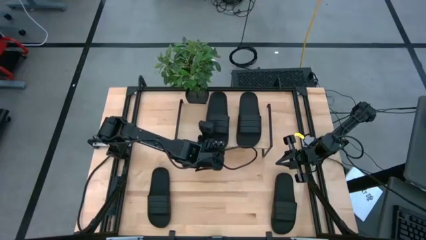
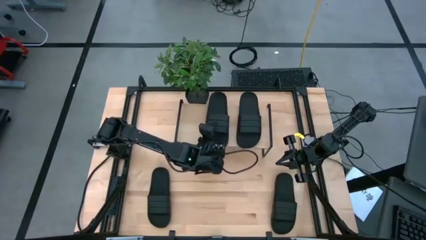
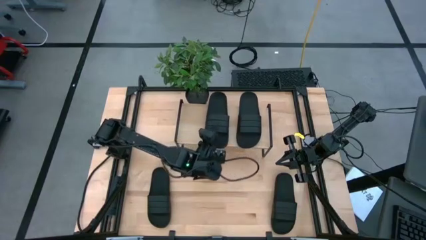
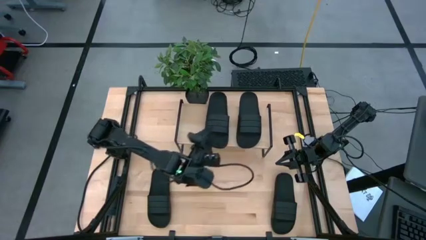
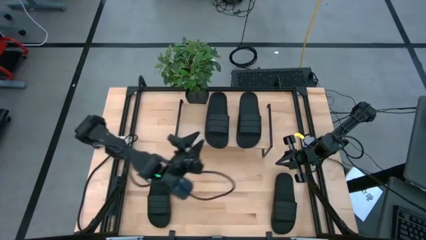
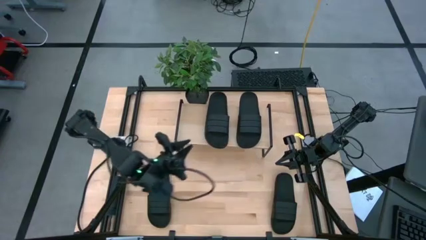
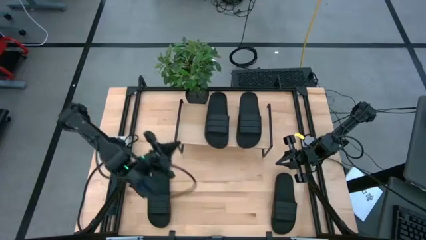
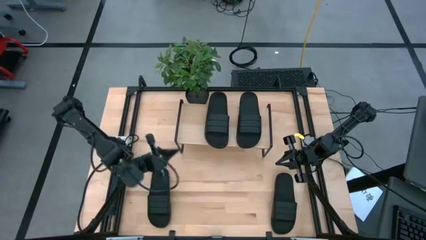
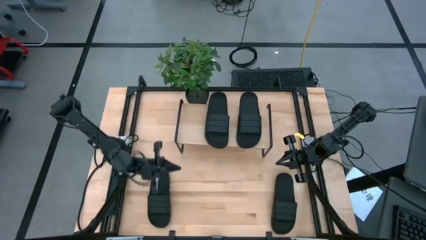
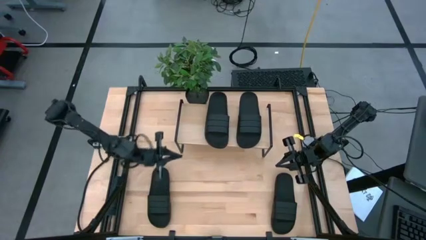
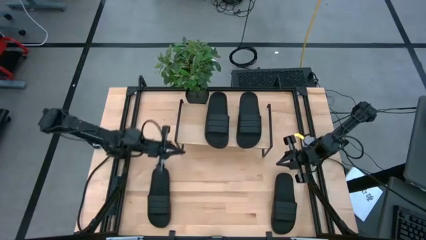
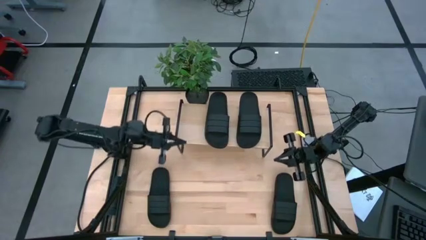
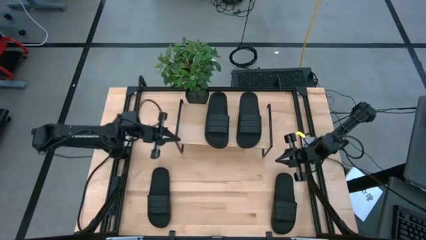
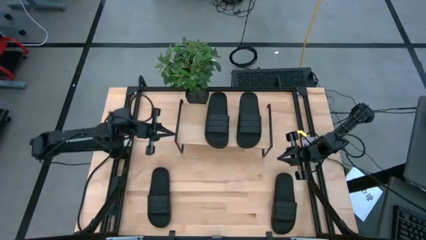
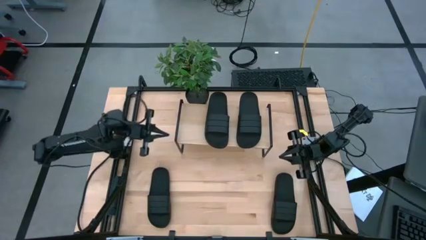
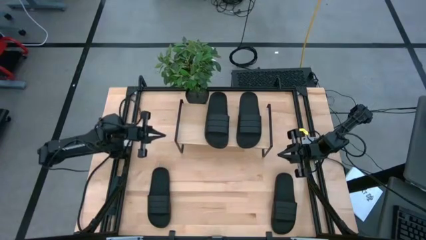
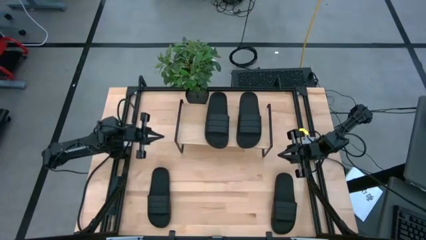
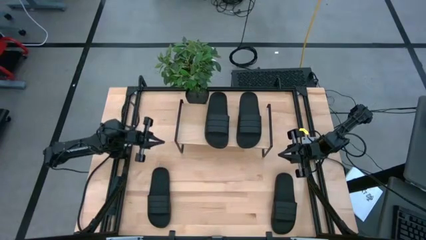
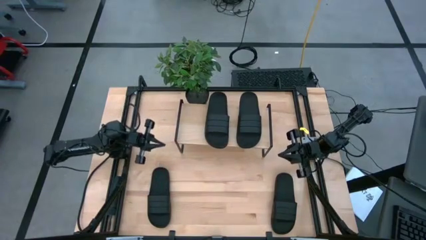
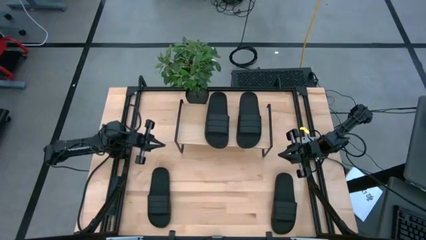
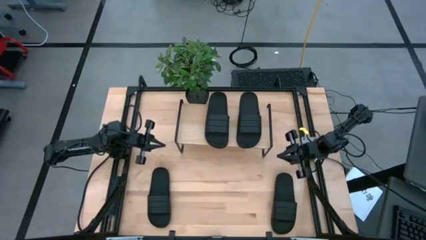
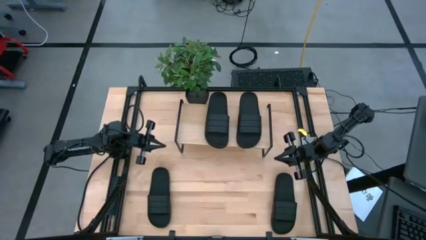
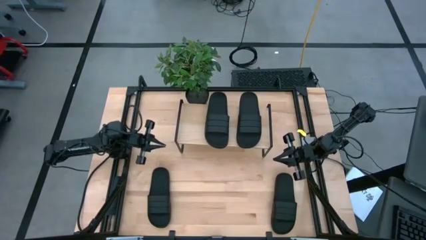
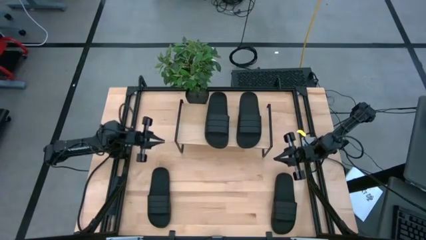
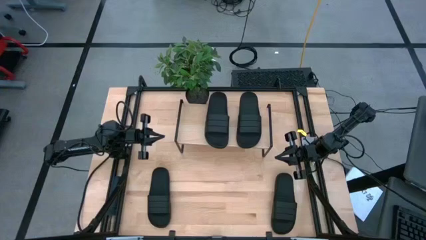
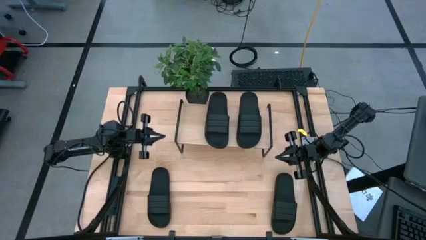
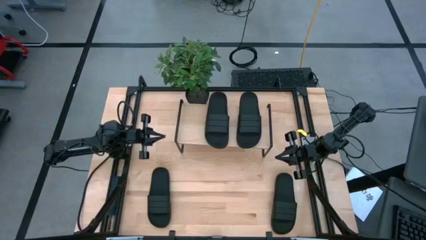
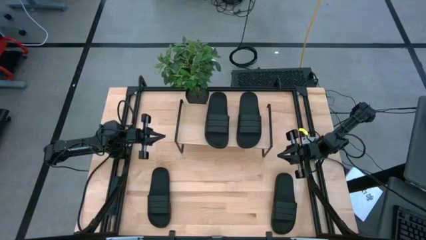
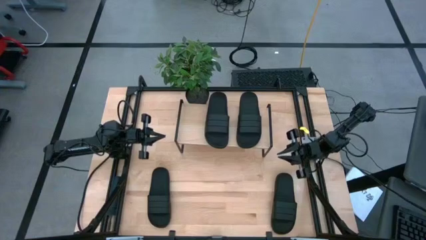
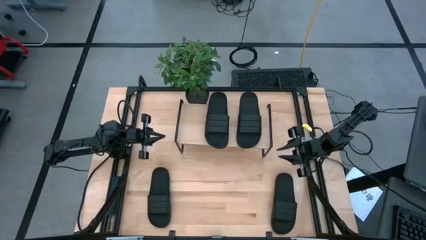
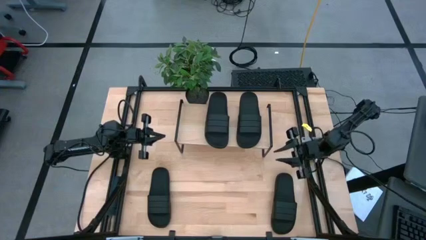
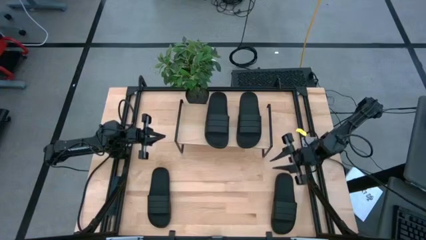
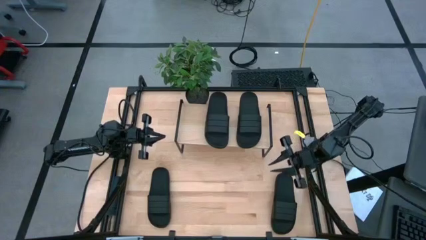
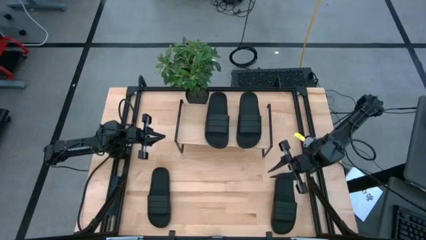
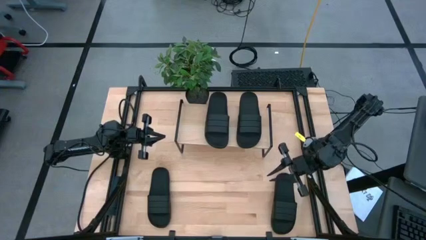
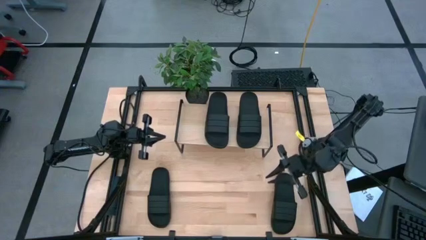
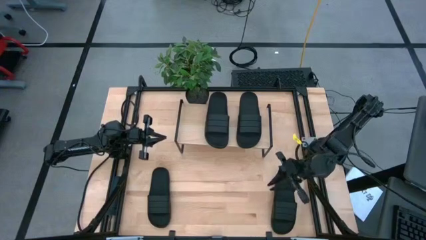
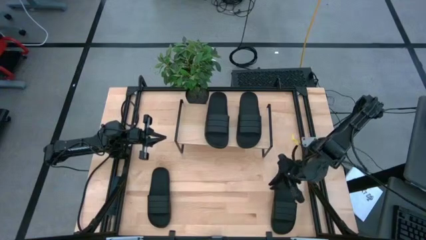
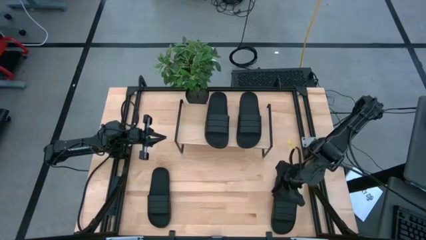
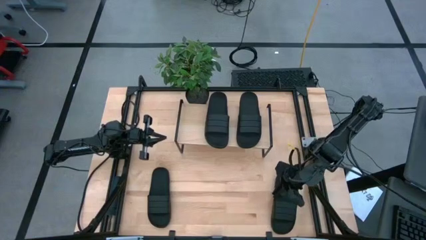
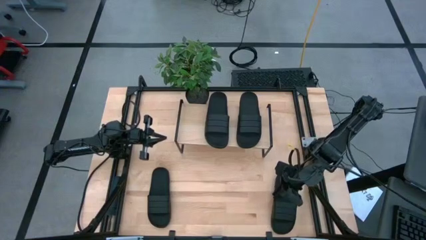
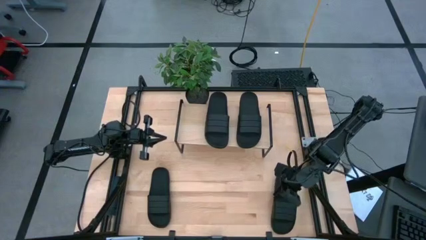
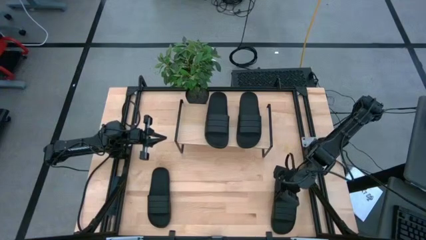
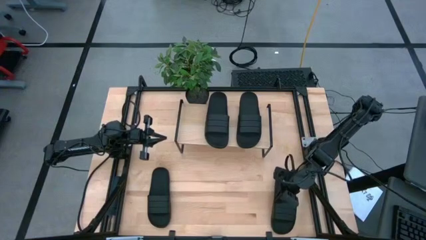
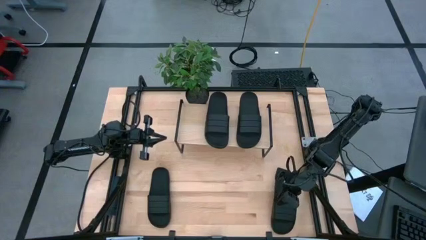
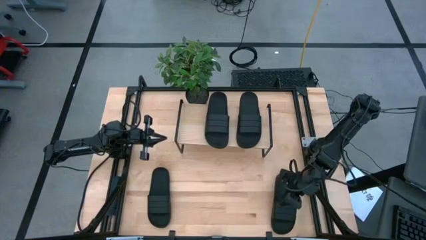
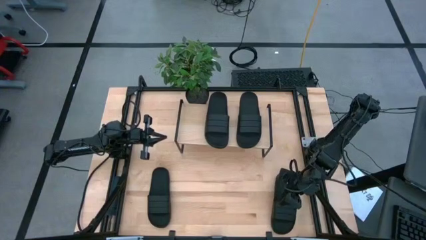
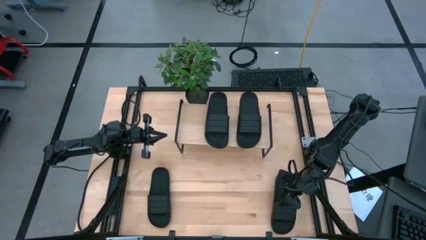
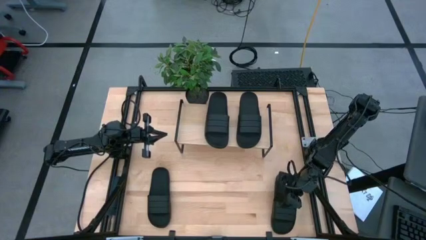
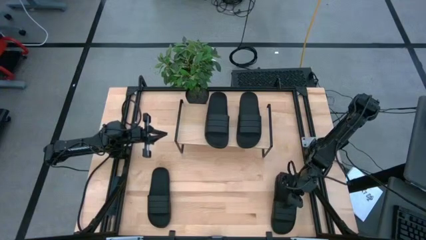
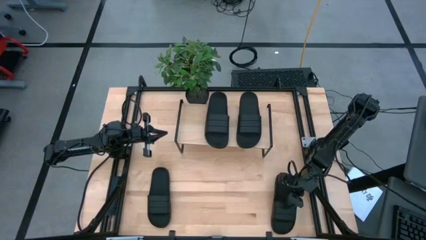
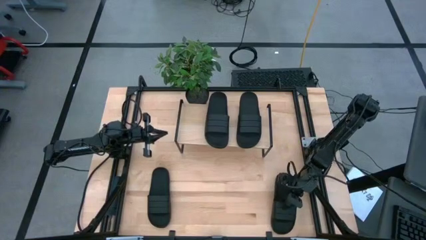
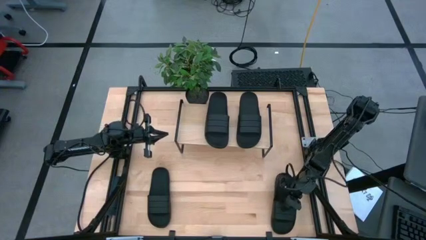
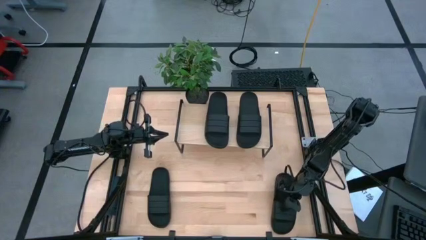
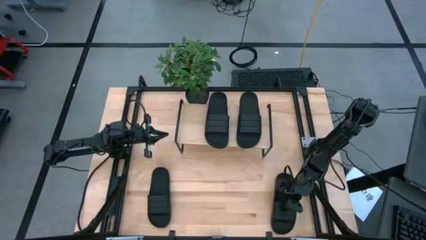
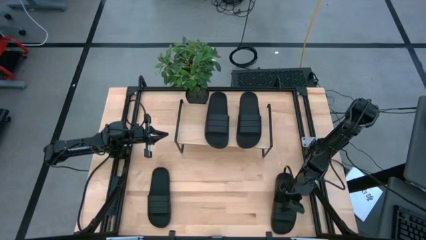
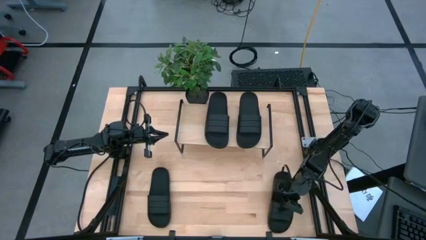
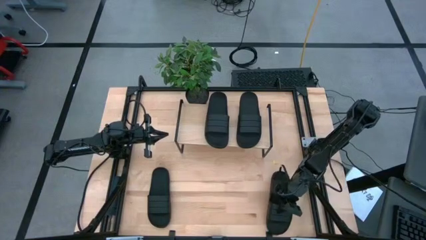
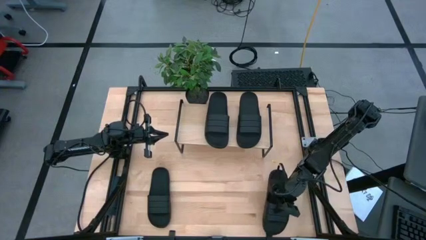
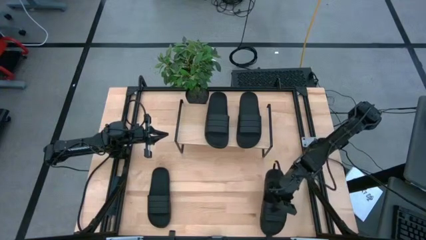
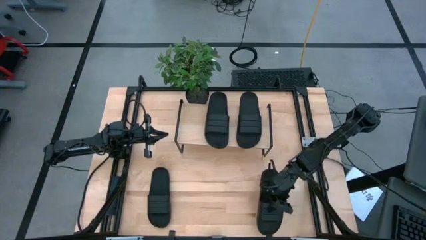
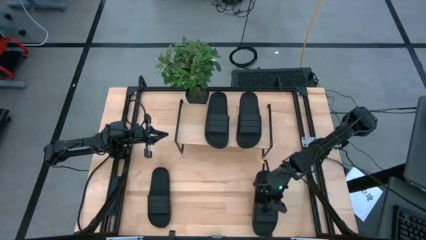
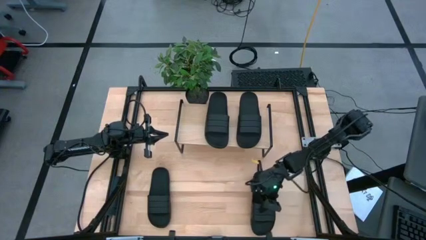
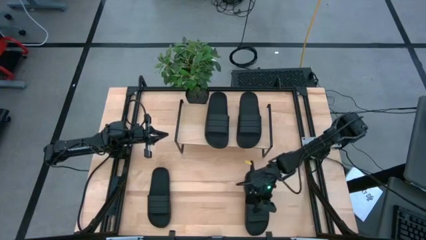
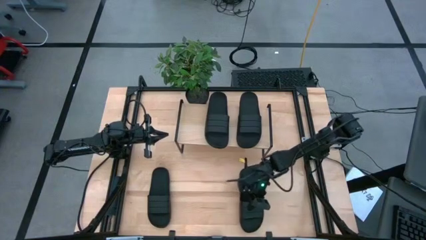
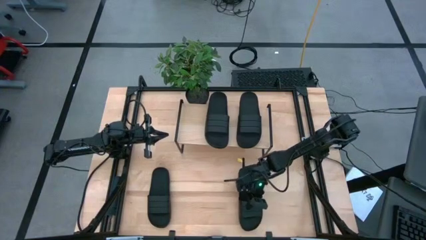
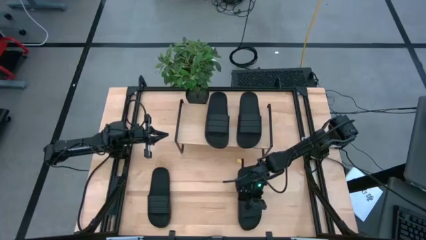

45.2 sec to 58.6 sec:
Task: Pick and place slides into the shelf
Put the right black slide under the shelf
